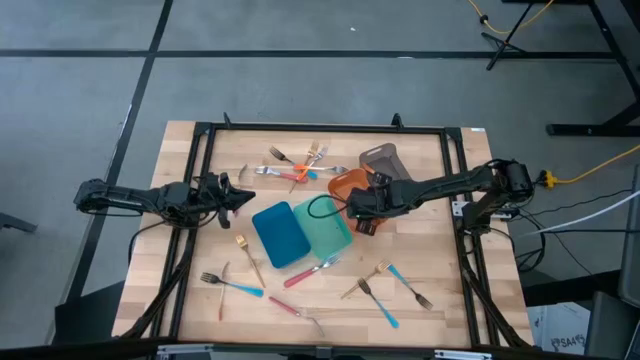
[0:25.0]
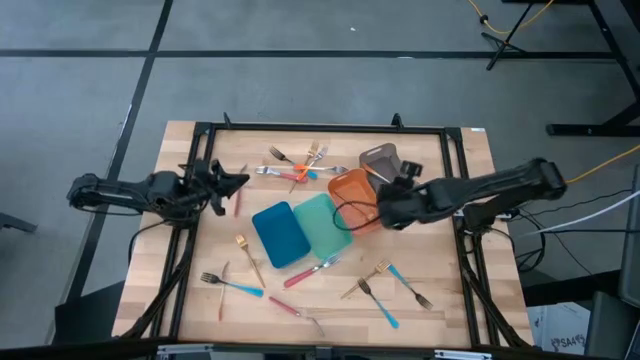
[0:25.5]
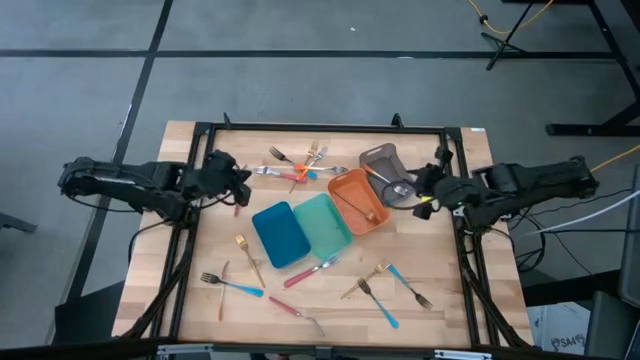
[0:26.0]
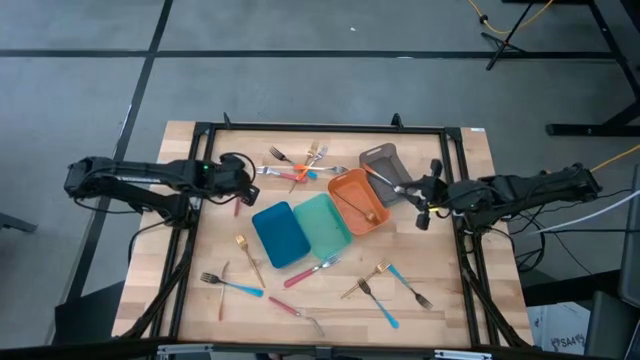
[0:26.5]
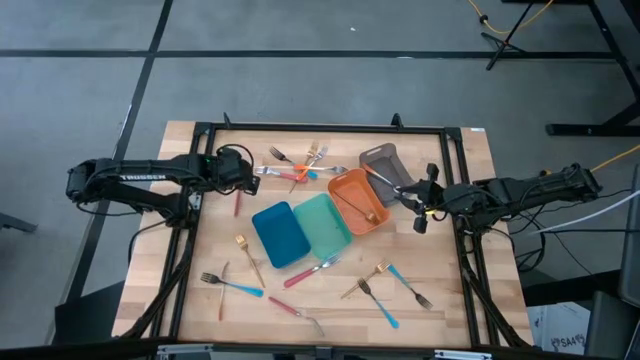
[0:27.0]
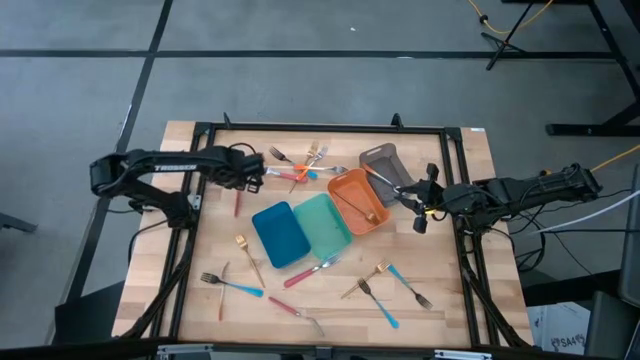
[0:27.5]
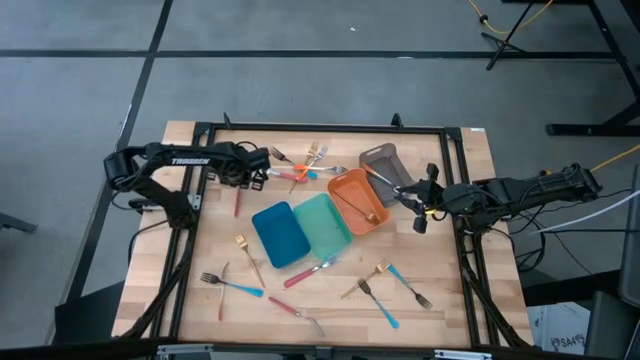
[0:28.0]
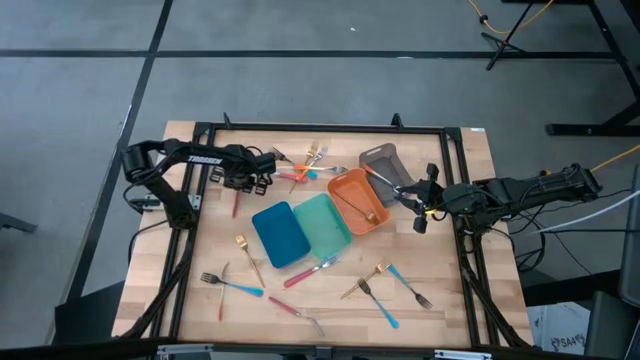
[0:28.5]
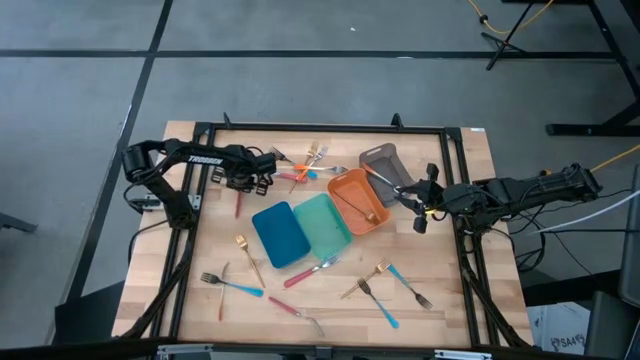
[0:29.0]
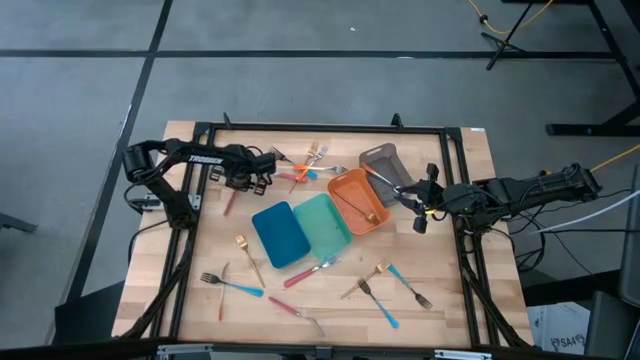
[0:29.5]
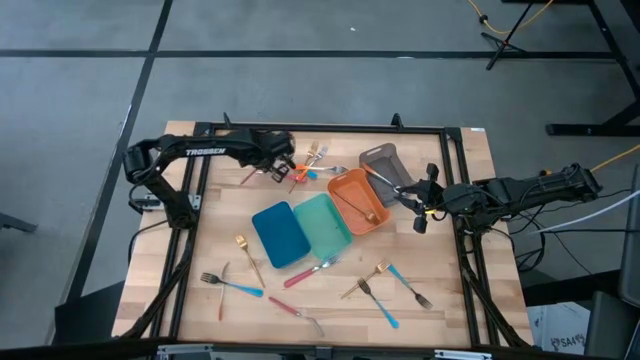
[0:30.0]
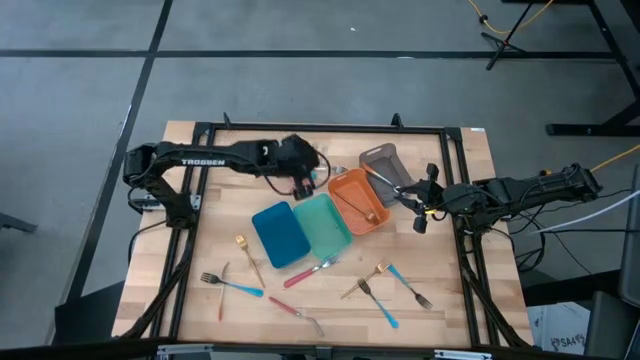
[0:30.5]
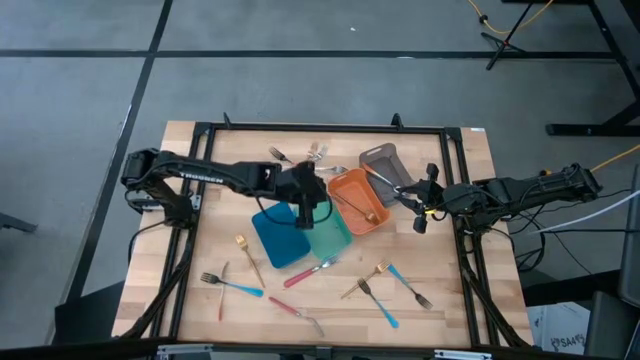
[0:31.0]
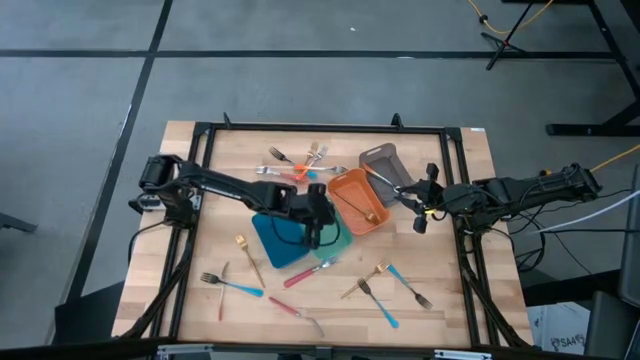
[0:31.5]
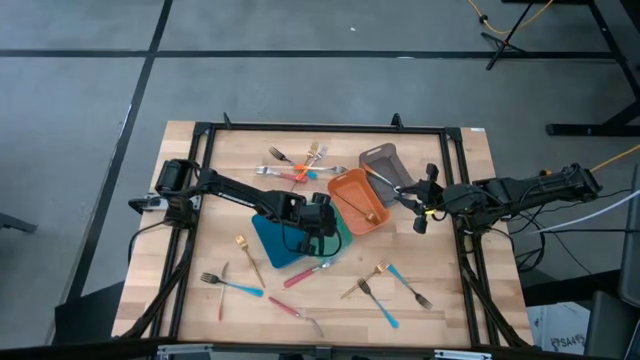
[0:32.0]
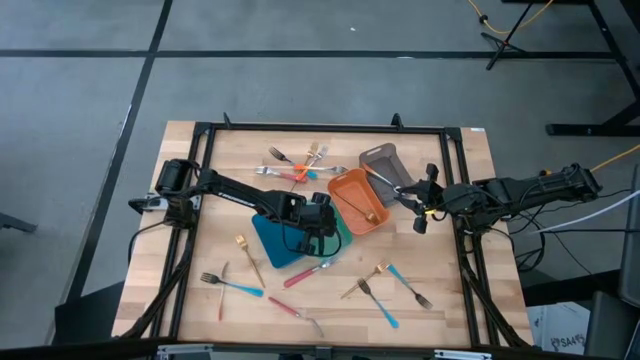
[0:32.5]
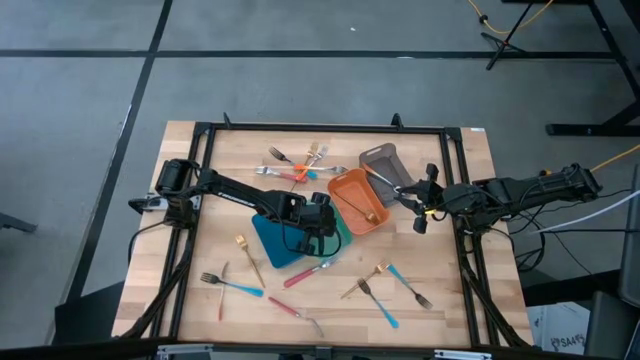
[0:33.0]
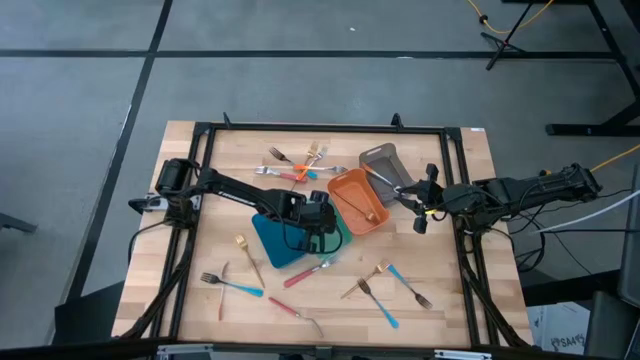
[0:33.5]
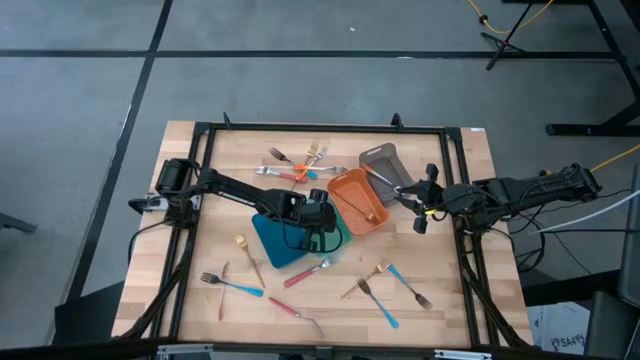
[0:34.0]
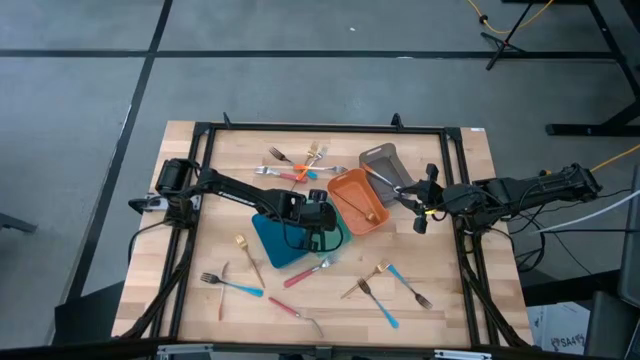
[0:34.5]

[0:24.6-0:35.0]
Task: Sort silverware by color (type)
Put the pink fork into the green bin

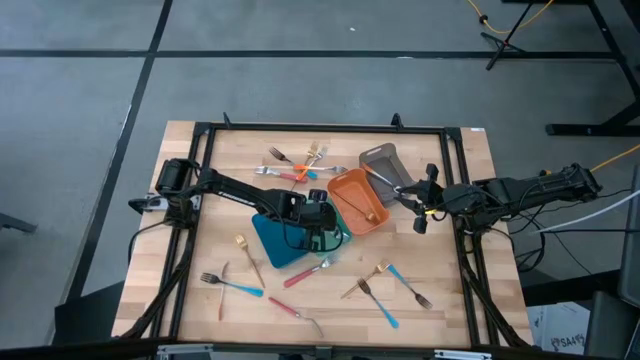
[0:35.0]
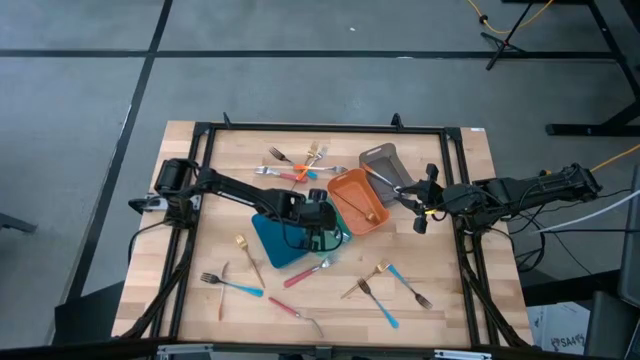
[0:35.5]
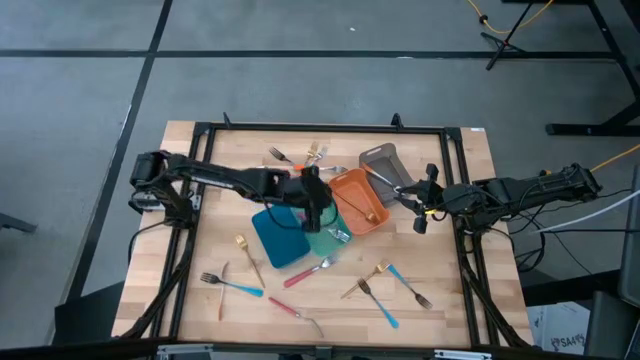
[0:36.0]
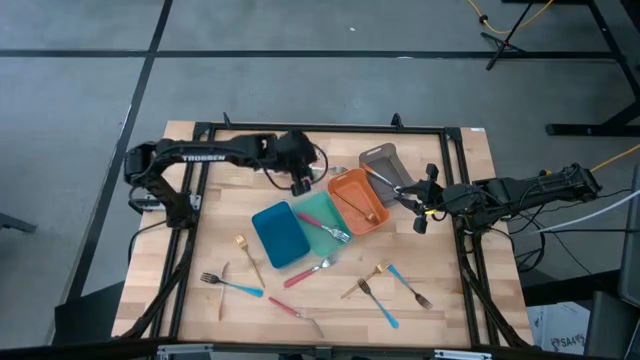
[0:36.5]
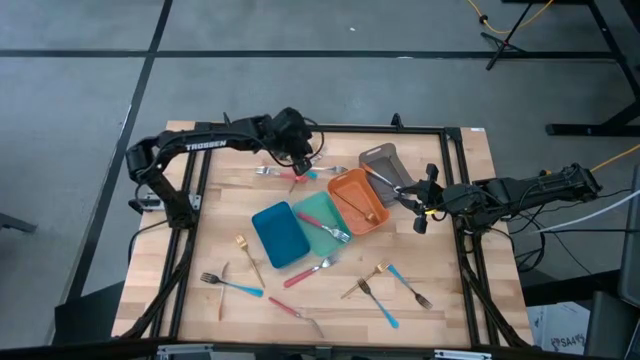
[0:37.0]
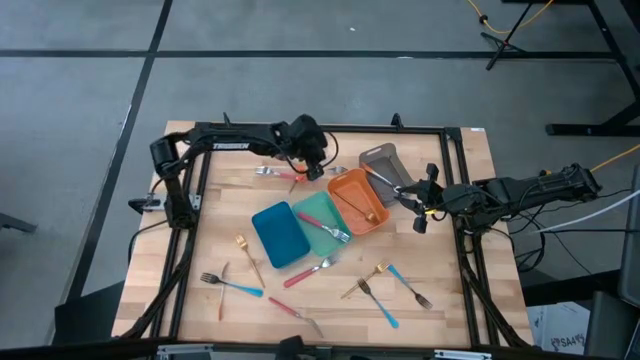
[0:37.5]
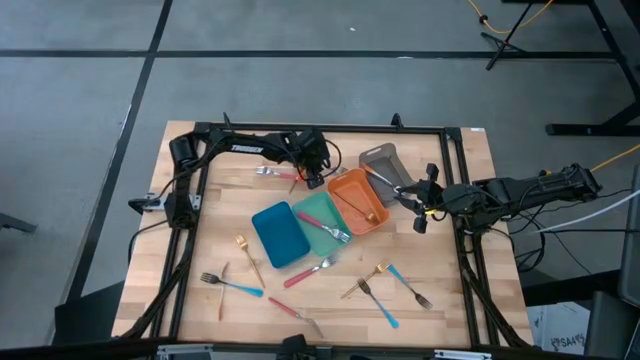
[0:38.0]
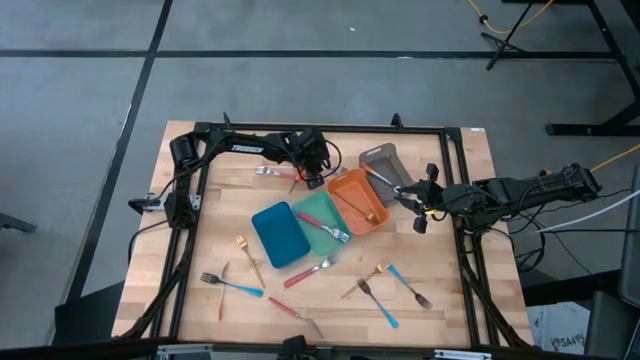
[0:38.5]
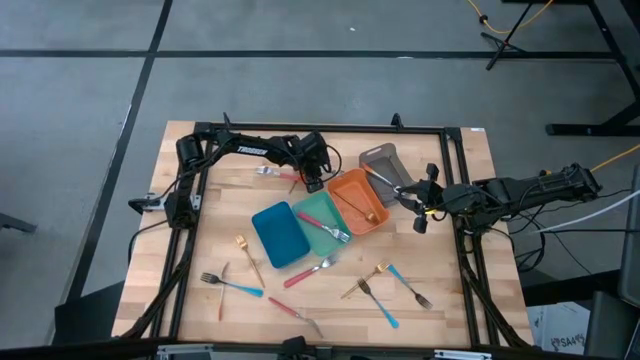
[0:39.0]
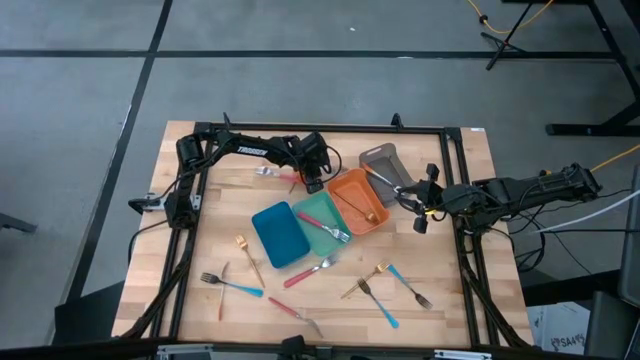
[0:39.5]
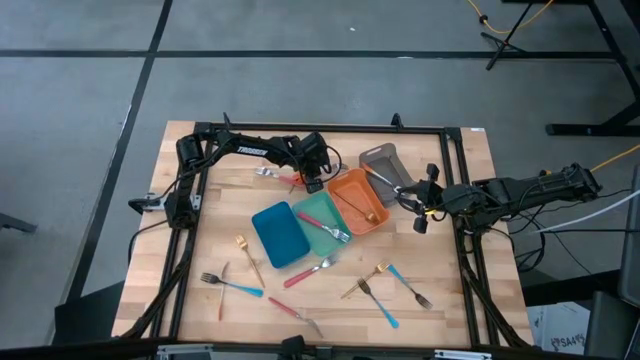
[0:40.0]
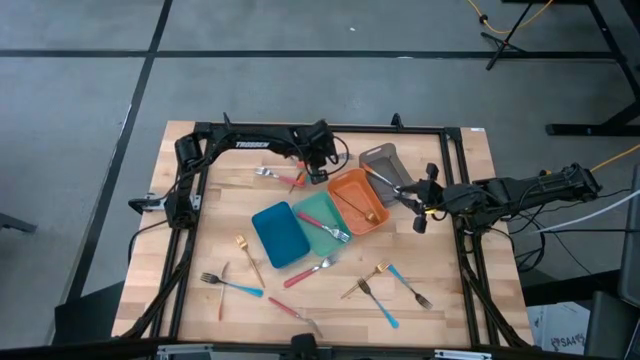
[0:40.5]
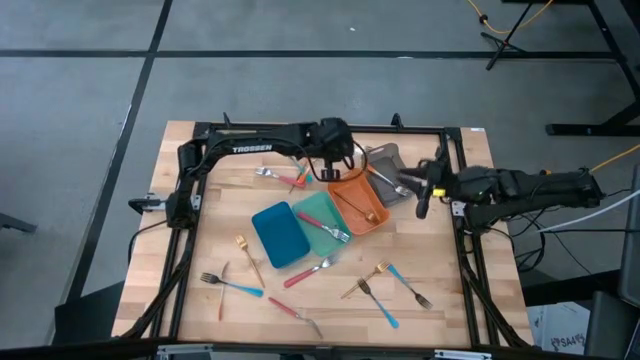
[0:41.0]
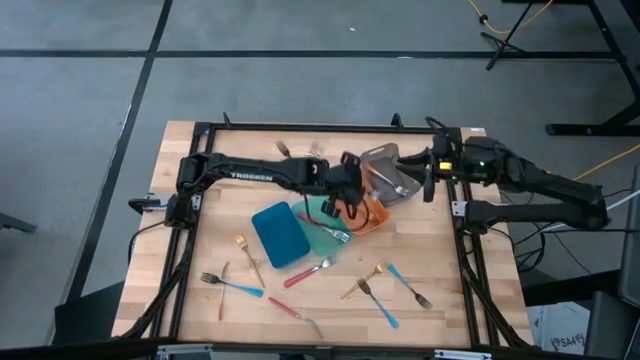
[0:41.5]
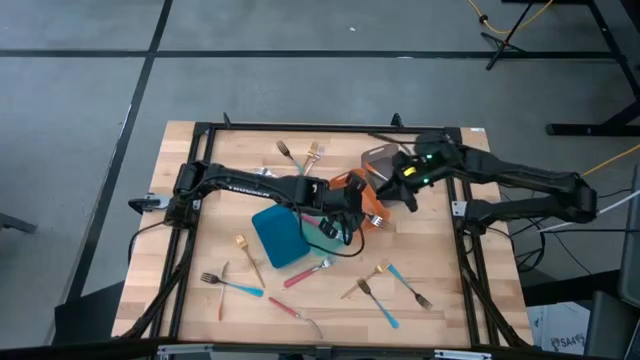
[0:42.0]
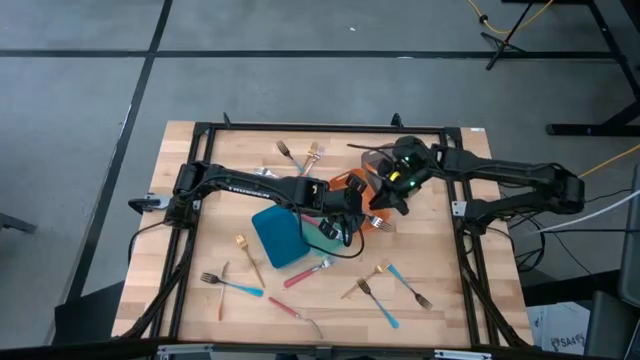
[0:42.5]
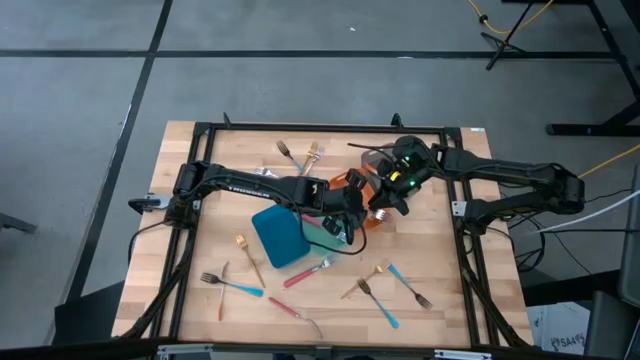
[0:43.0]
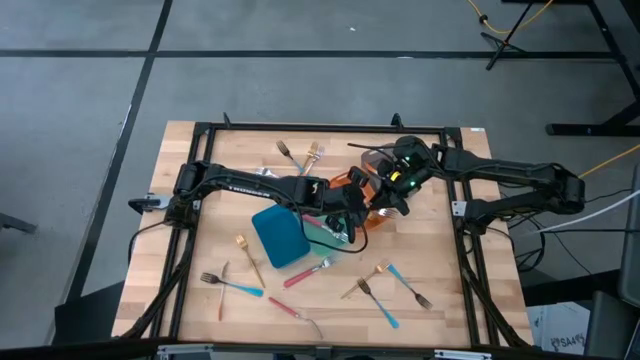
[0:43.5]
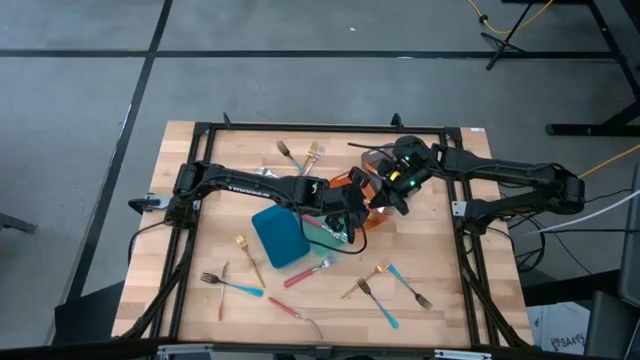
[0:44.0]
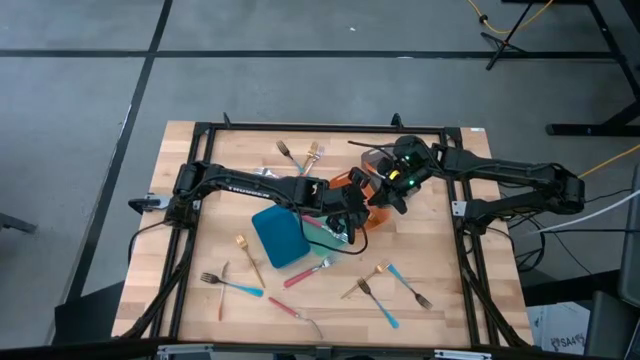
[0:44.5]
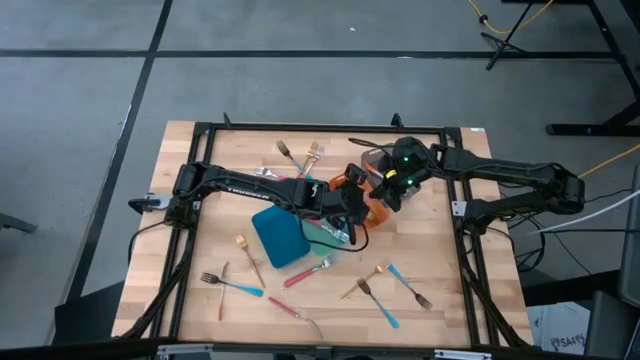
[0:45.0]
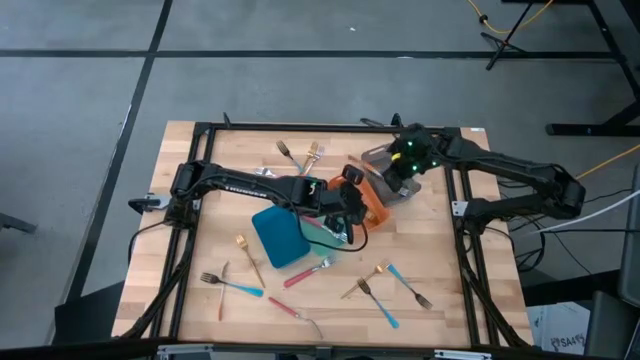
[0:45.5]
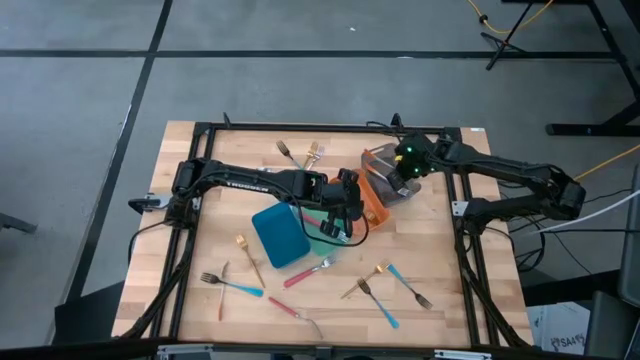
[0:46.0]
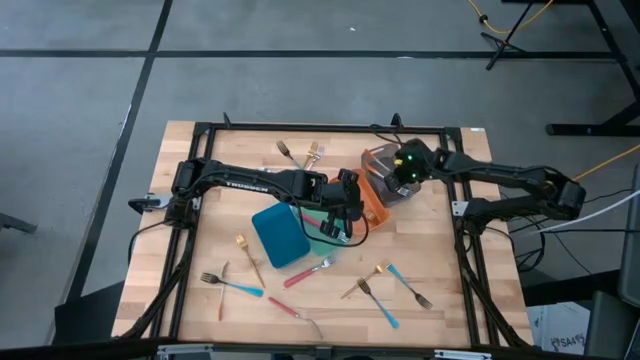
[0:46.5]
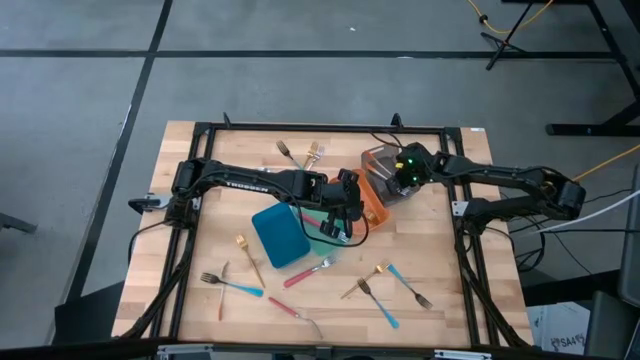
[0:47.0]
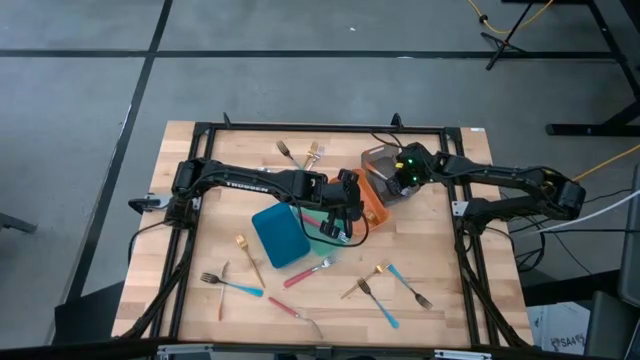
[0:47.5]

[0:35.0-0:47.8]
Put the orange fork into the black bin
